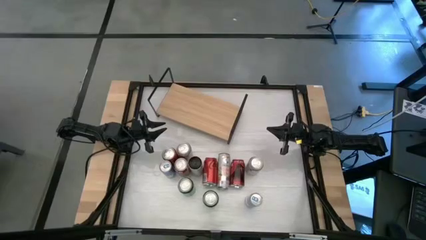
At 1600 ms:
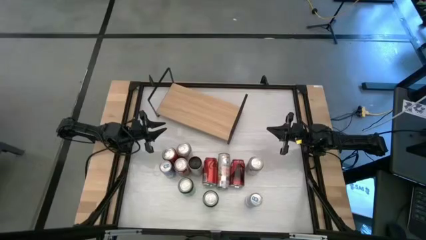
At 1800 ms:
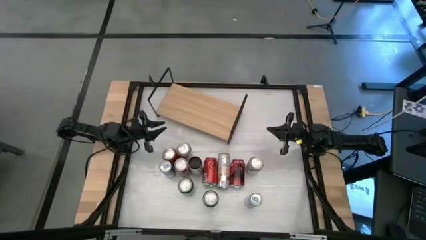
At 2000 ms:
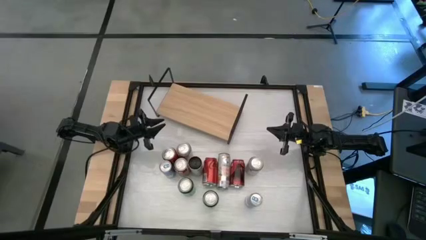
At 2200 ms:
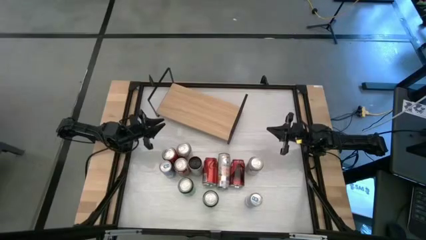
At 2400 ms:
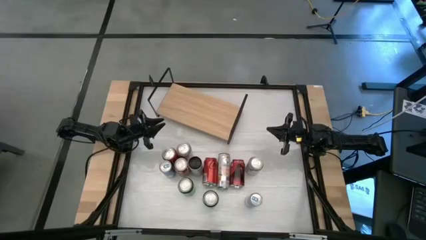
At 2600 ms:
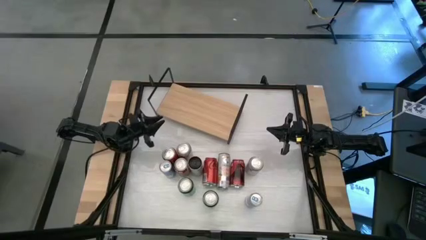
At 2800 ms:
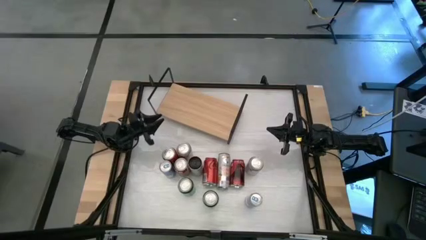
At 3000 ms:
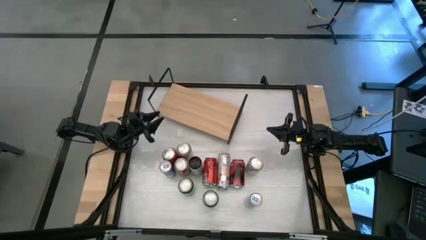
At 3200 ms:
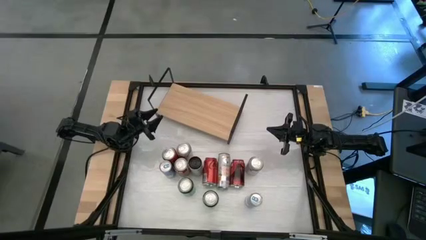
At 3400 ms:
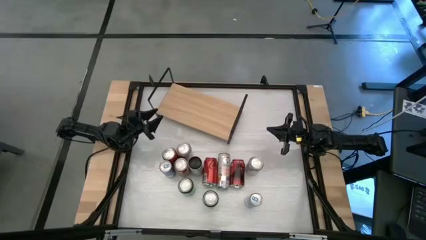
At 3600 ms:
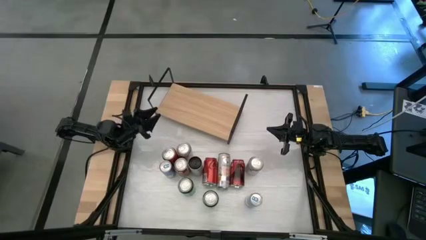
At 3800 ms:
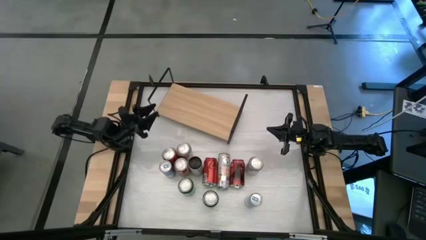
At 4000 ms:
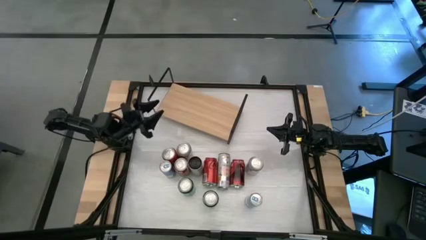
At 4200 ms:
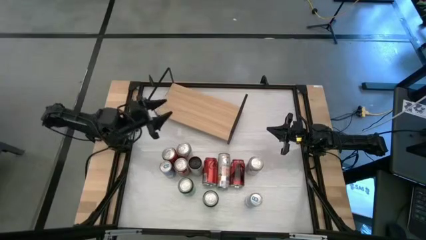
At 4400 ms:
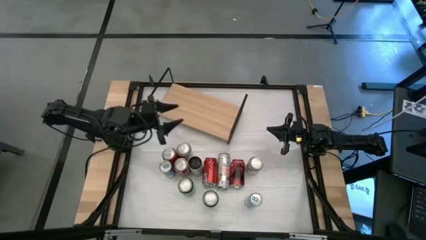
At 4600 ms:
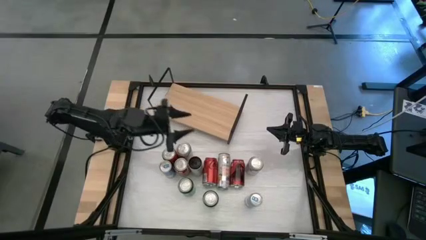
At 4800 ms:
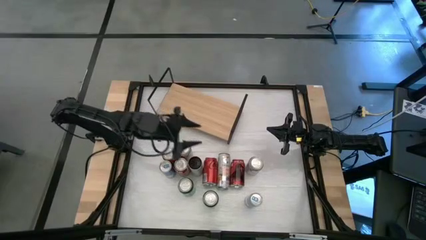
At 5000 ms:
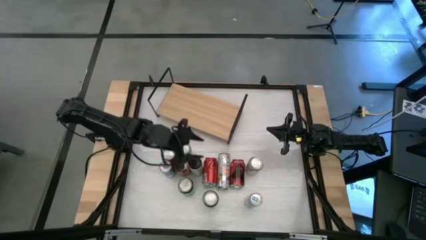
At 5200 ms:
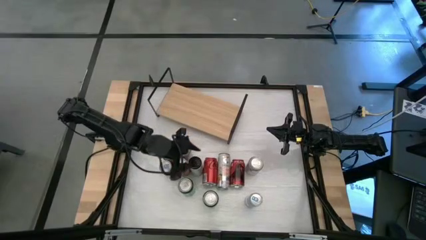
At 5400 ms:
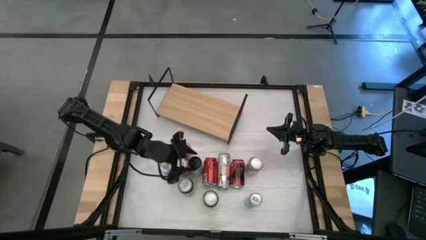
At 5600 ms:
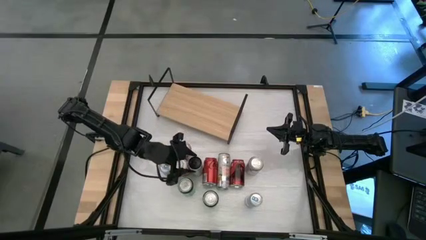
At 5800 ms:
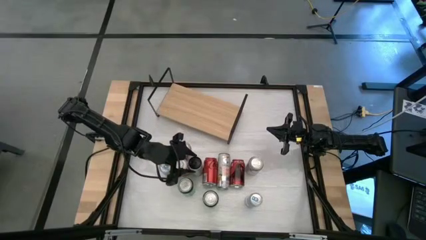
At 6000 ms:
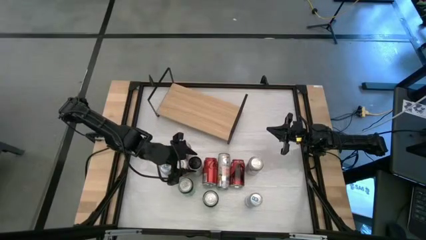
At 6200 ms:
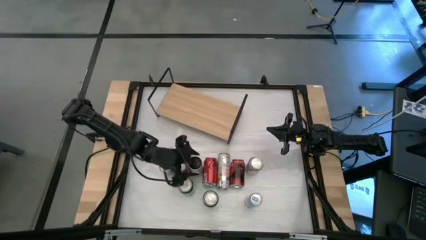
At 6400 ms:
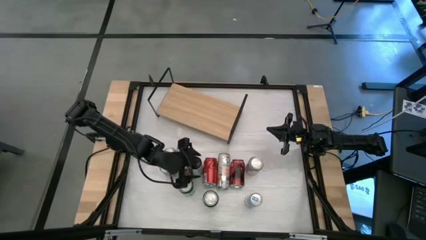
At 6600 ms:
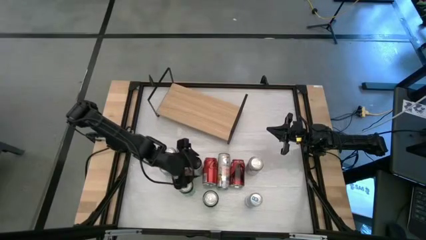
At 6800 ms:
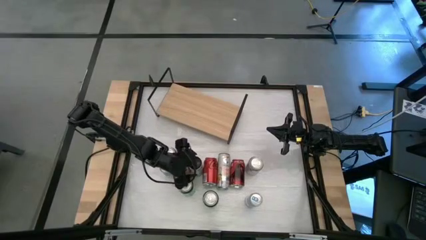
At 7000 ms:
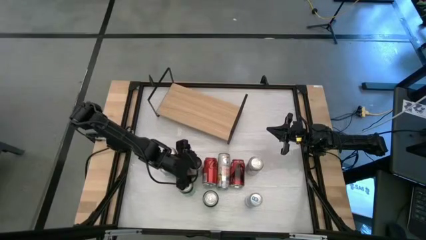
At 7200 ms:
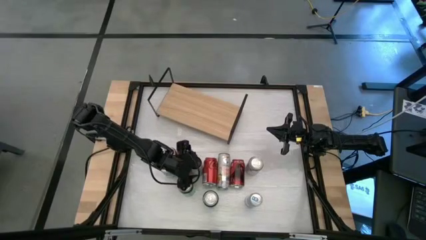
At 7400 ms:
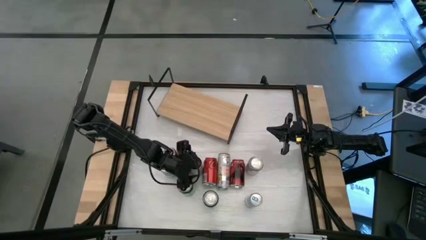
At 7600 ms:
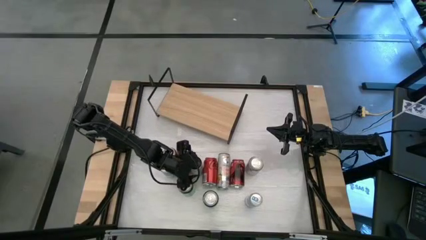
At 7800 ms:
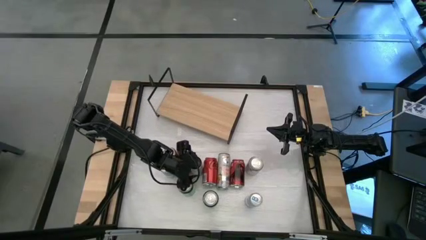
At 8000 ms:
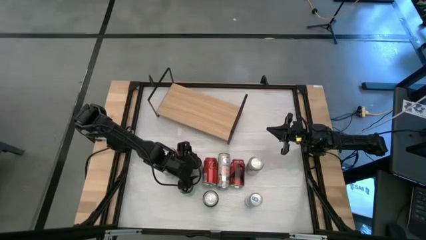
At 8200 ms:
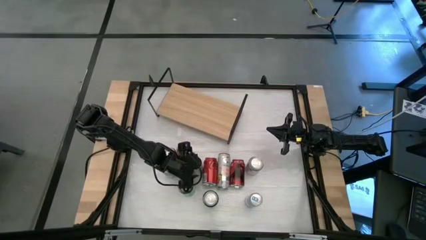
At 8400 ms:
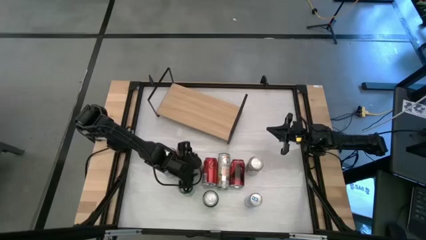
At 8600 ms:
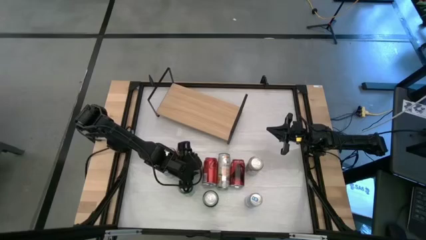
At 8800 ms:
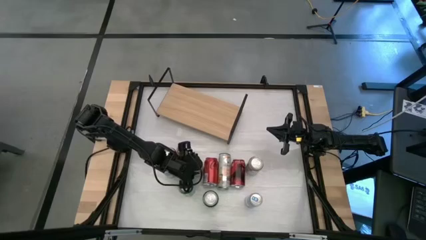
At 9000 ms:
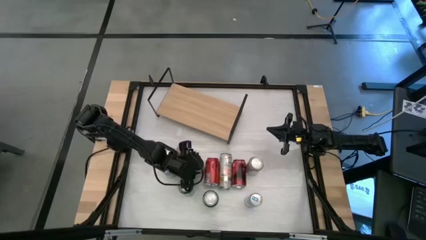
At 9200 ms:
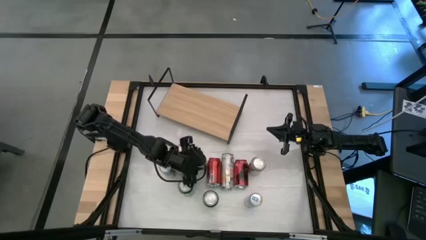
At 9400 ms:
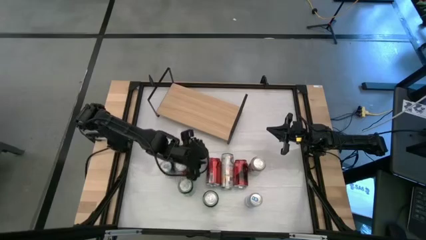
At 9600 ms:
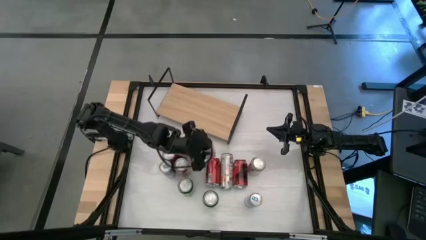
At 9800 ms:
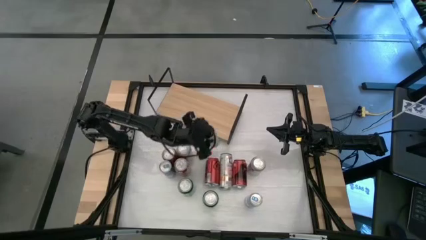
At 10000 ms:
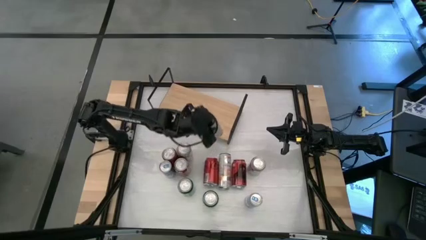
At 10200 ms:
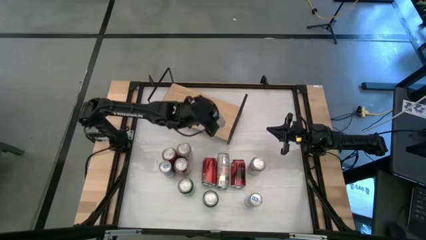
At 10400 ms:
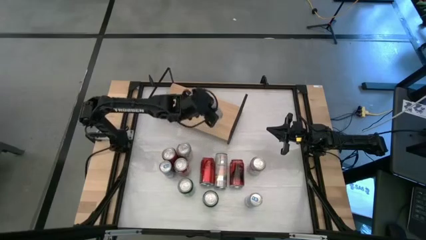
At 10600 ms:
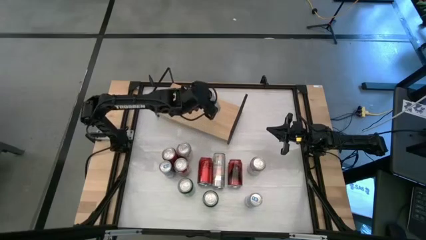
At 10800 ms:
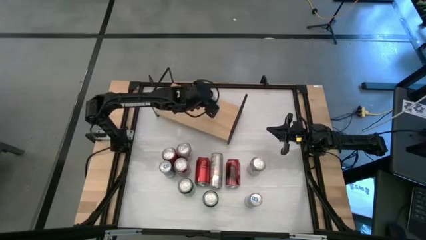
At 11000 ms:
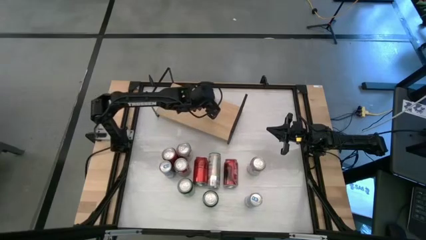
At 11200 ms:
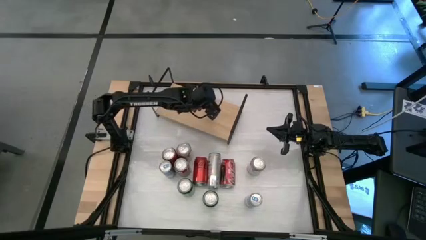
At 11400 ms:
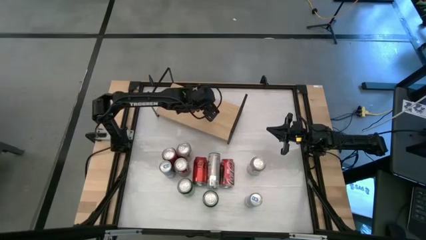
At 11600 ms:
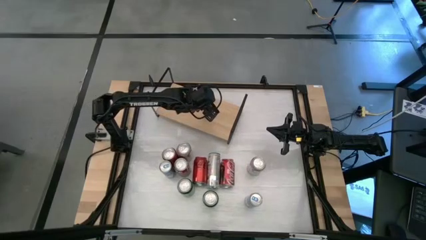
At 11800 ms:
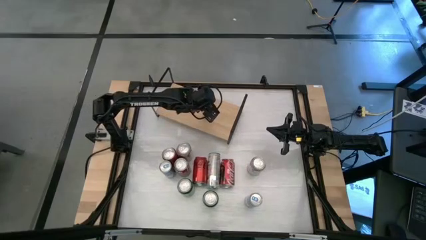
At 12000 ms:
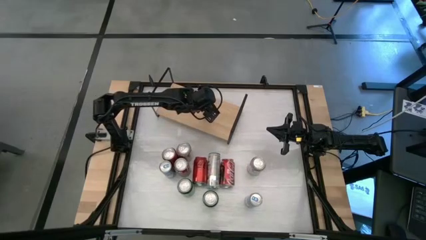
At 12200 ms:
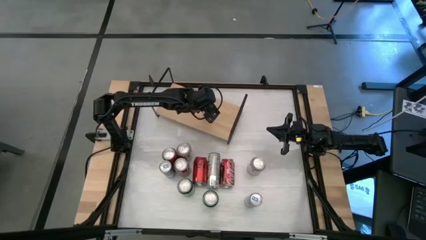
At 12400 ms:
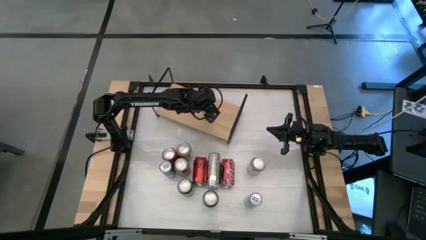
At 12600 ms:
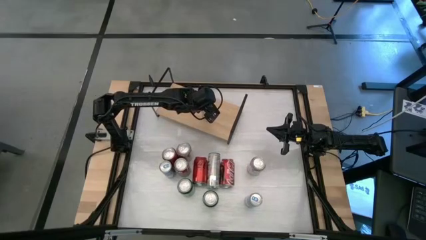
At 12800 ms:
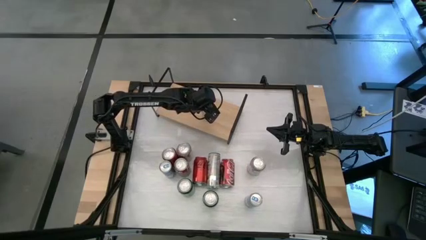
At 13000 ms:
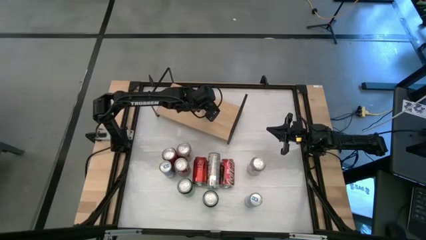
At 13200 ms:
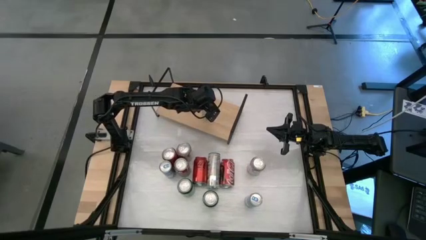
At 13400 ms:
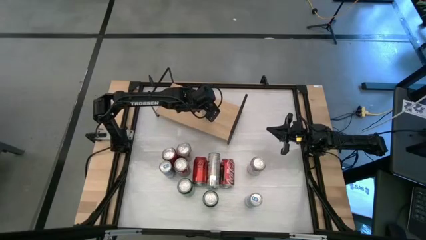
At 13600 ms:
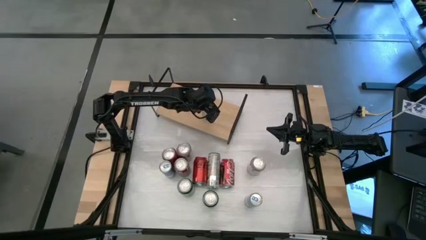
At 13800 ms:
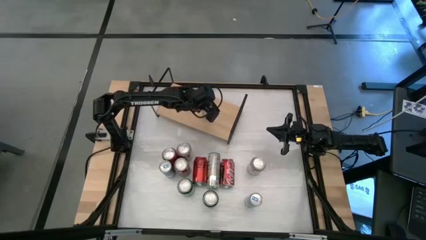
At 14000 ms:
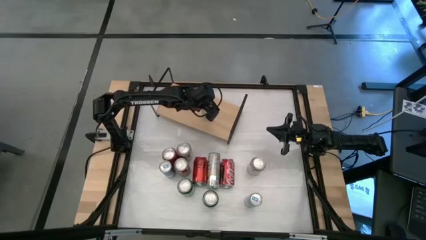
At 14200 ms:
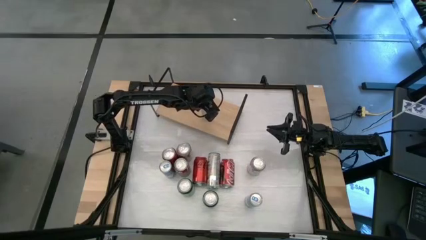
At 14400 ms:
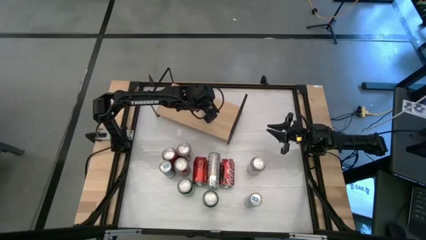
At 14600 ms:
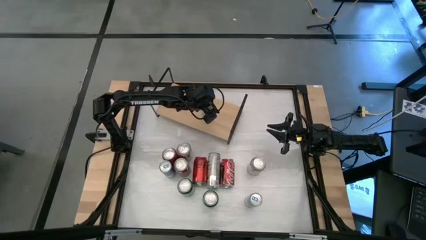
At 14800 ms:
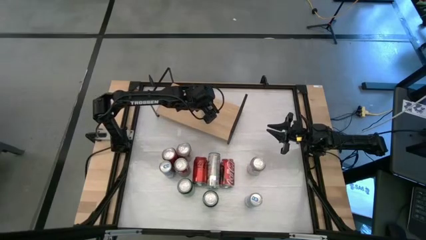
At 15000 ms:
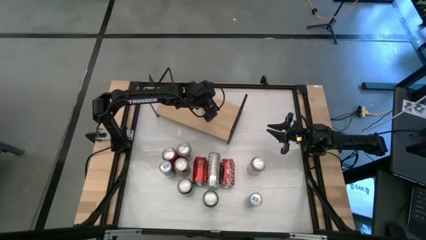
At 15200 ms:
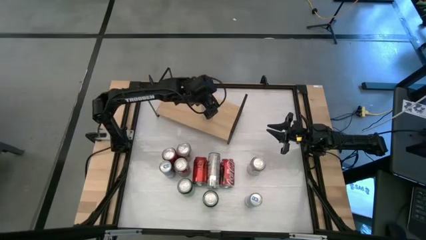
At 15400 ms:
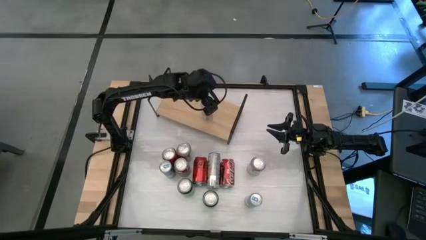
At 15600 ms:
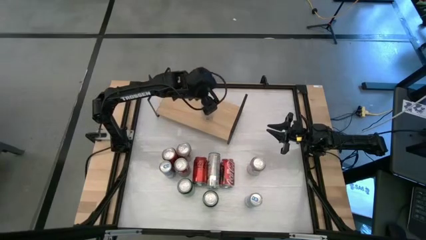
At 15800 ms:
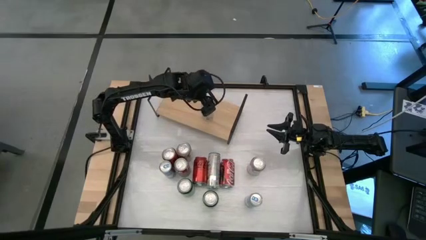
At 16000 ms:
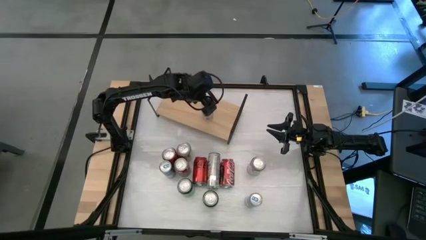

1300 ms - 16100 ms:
Task: Place canned beverage on shelf
Put the left white yellow soda can on the shelf
